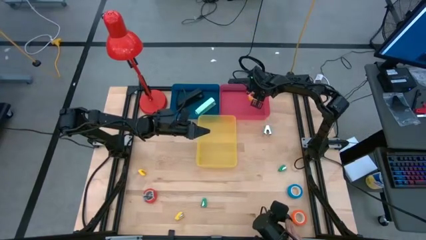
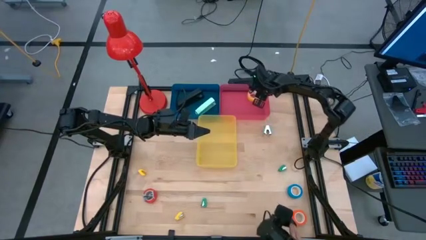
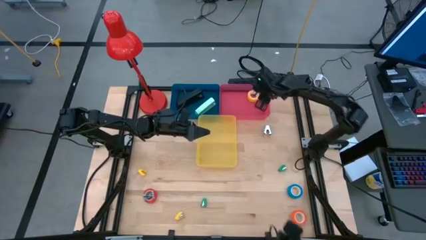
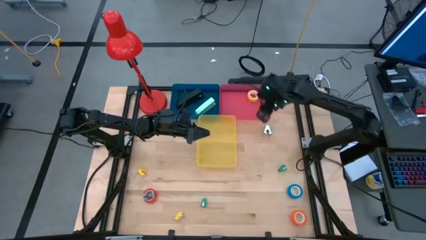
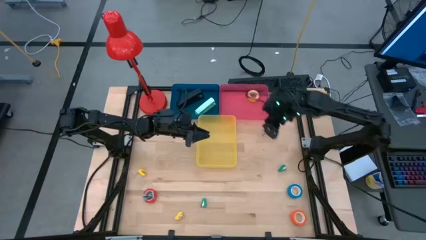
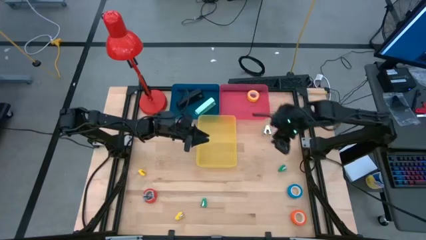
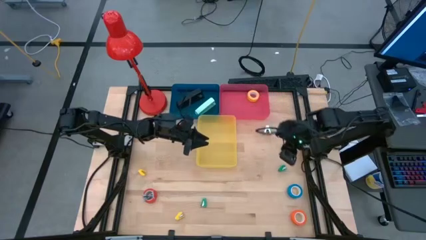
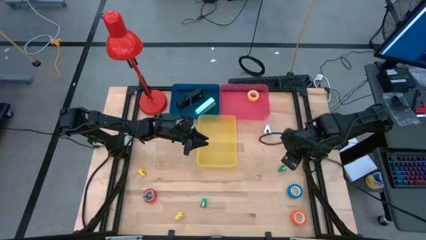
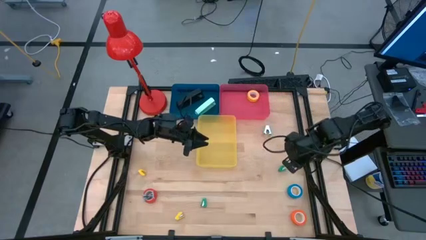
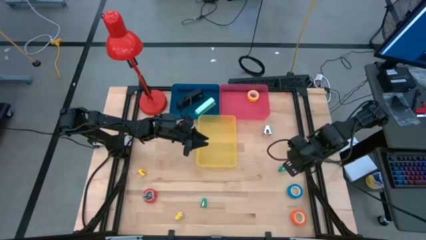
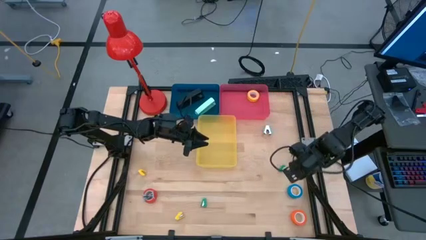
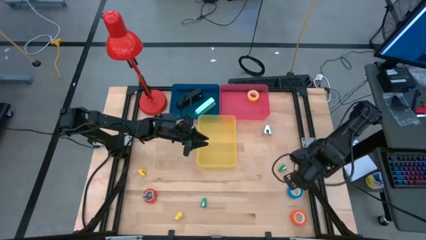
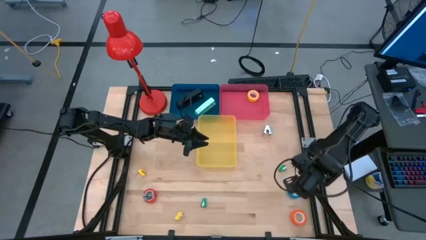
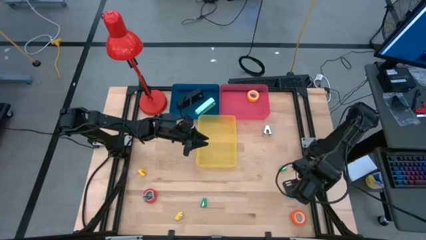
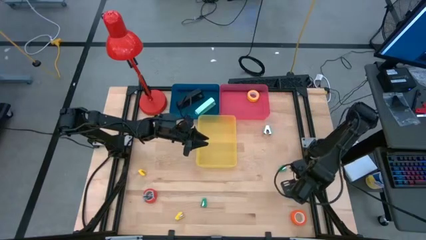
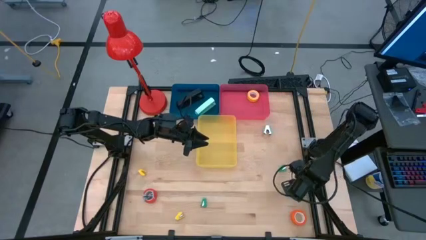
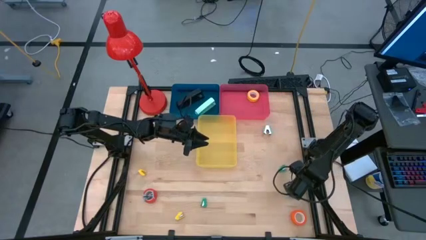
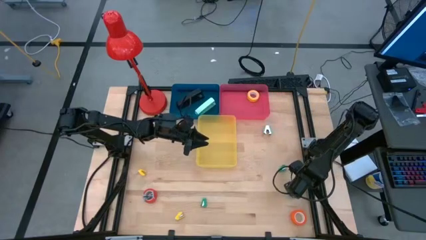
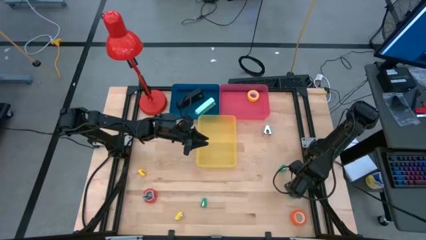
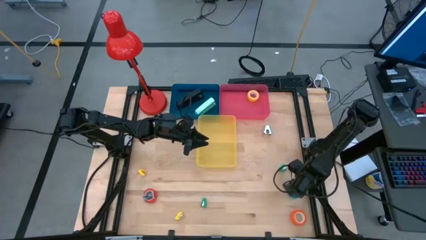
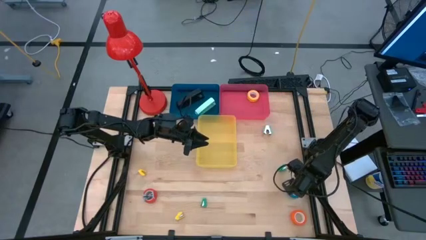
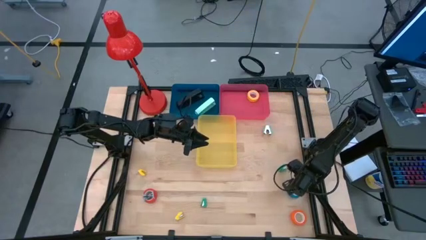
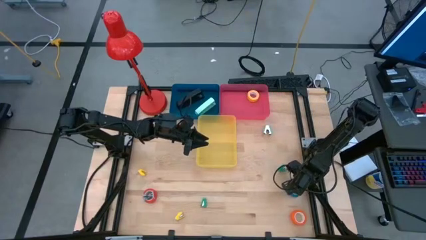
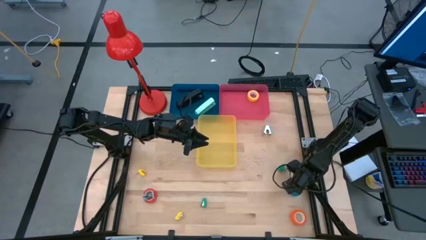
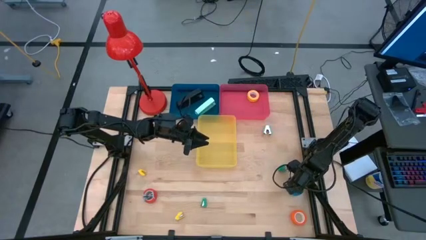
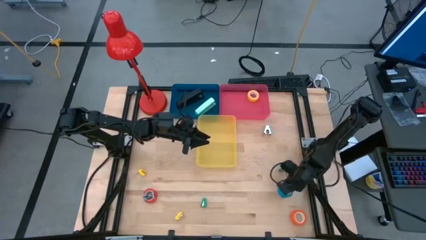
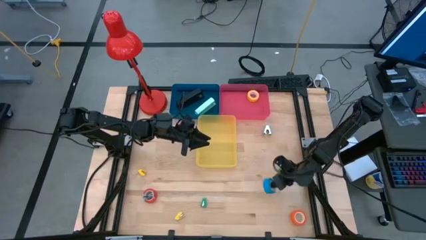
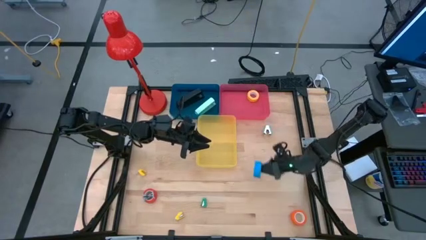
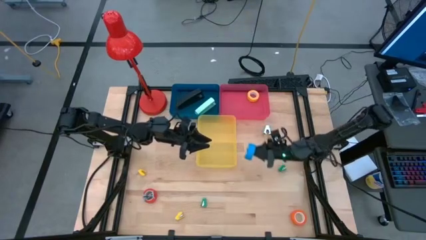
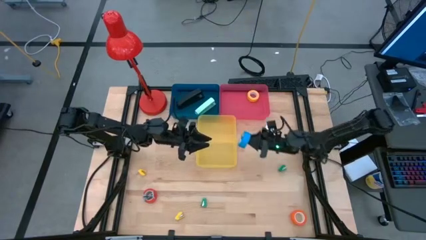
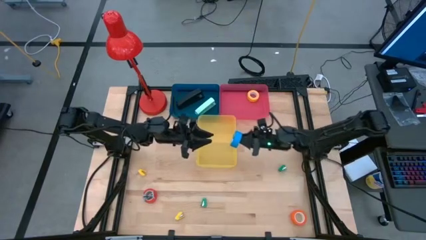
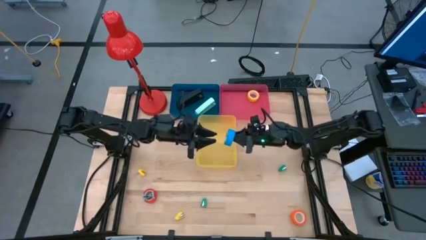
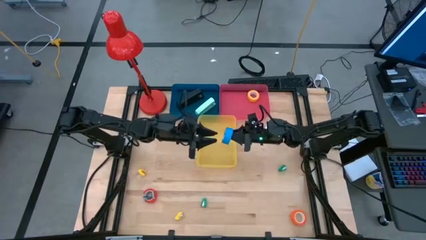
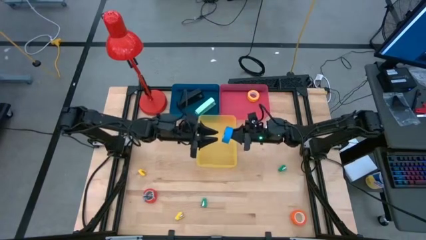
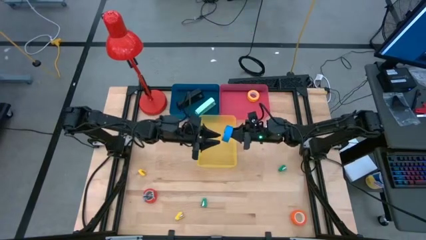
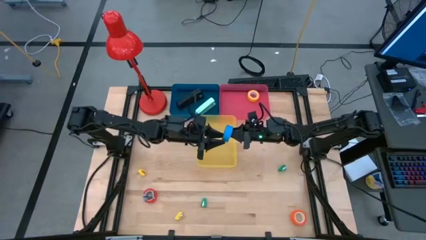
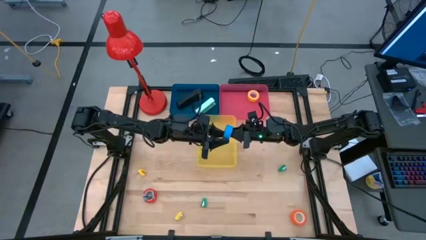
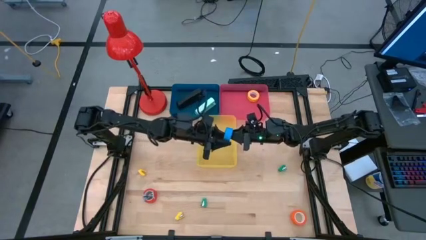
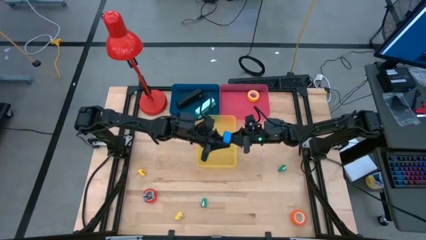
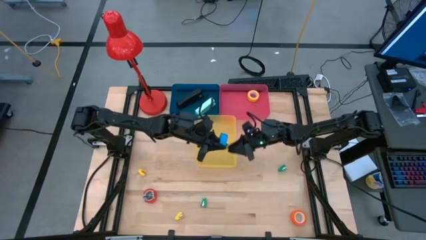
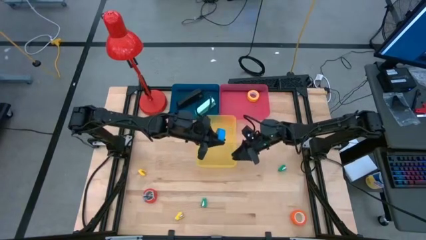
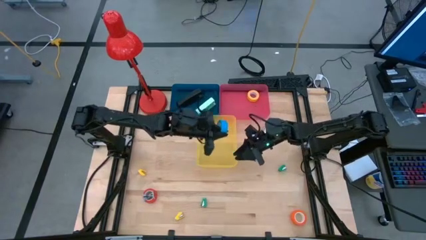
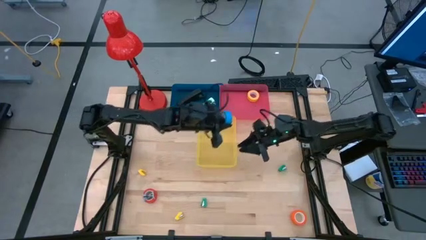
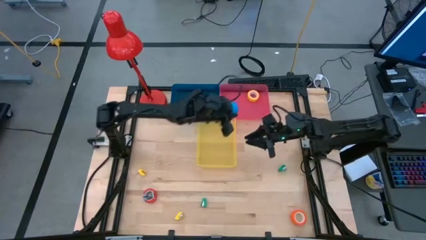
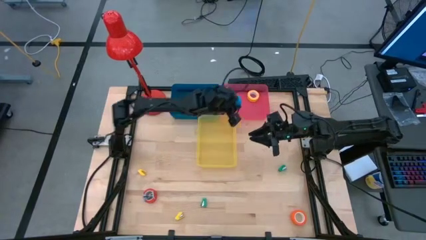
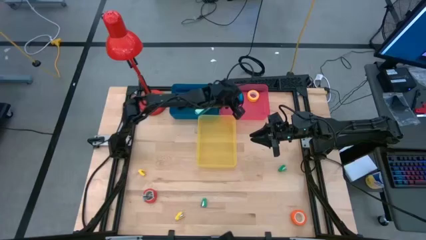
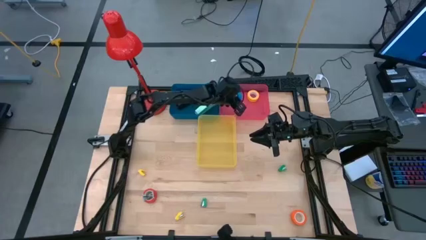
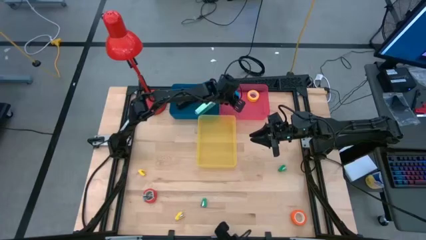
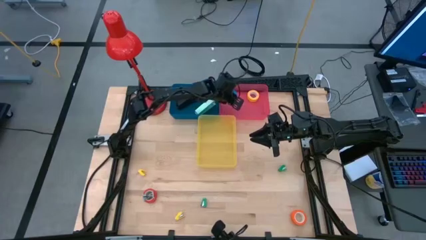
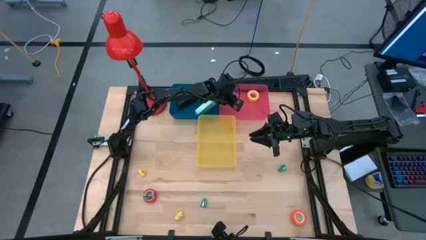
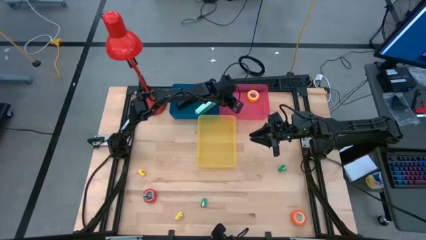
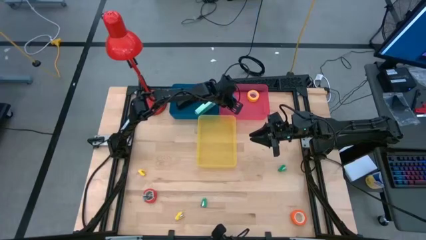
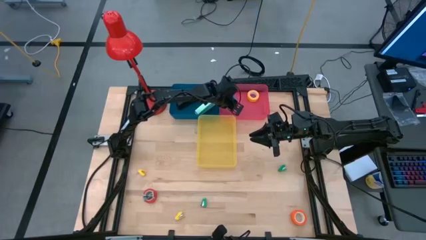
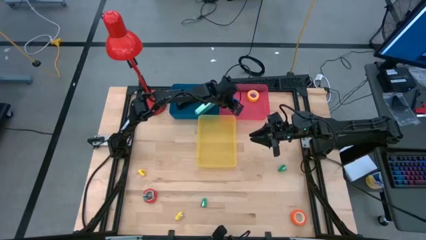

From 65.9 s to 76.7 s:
Task: Pick and place Stapler, Stapler remover, tape
Put the blue tape into the pink bin

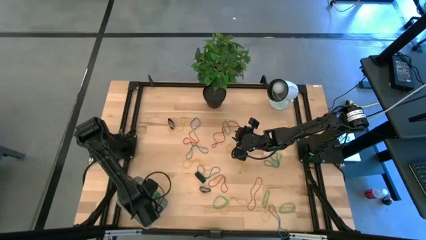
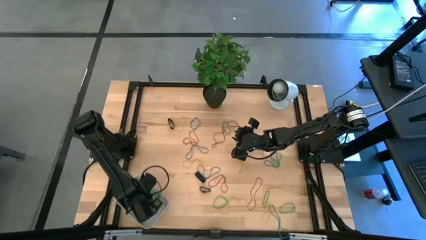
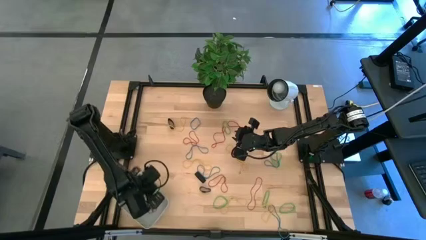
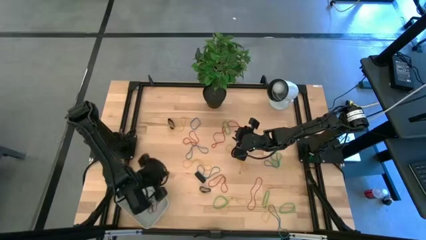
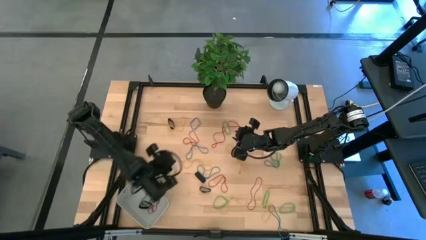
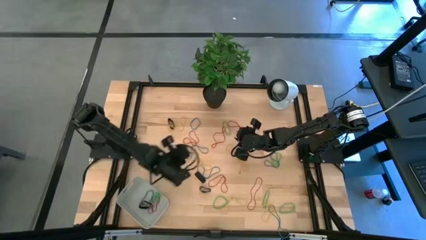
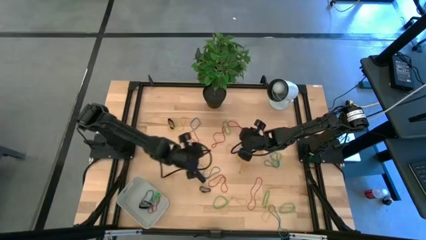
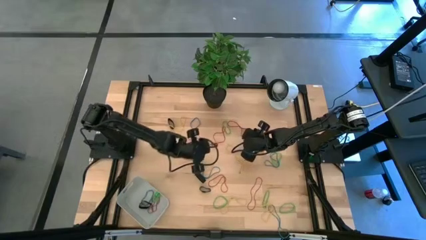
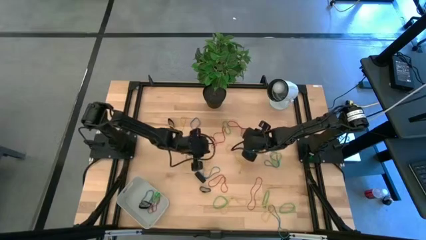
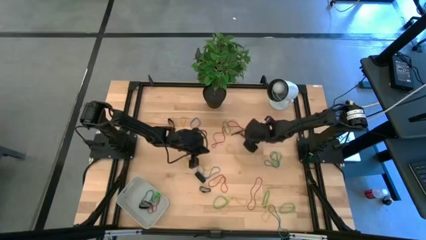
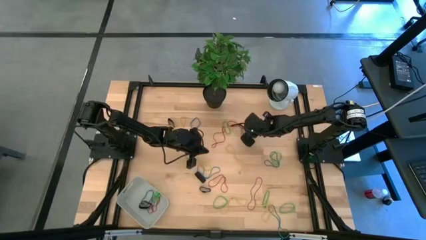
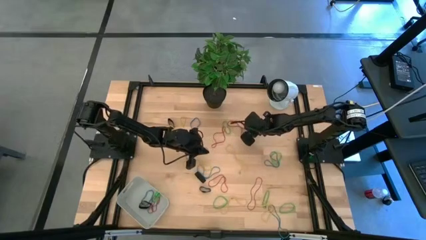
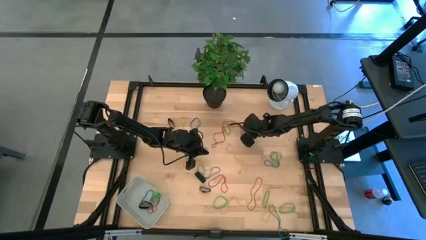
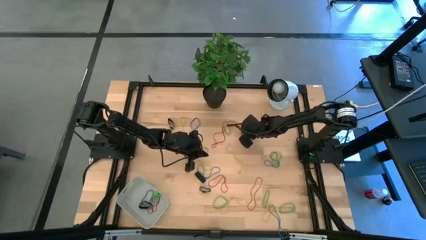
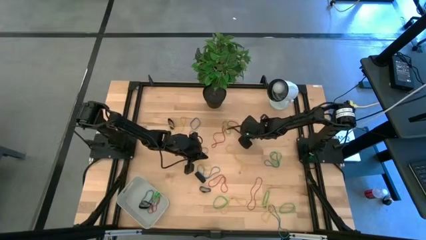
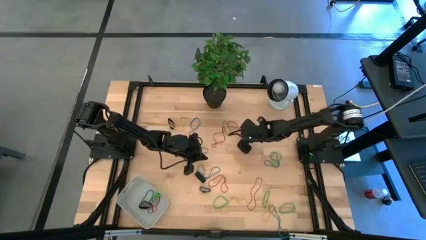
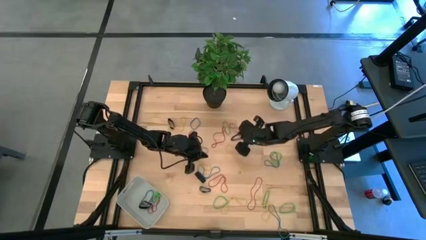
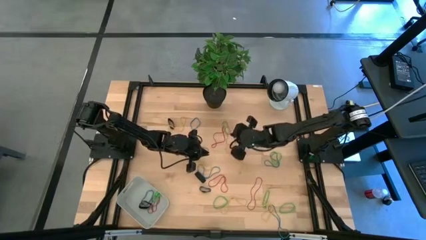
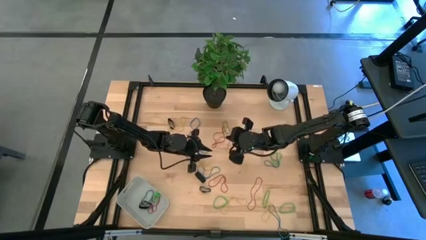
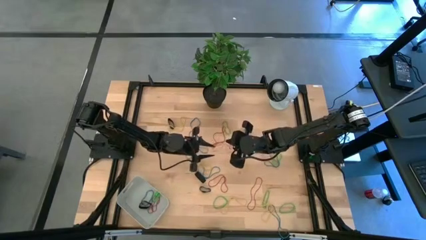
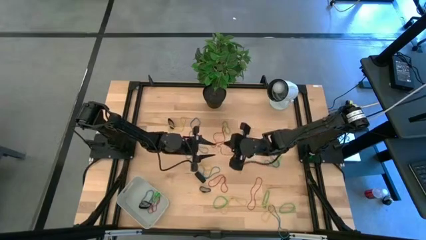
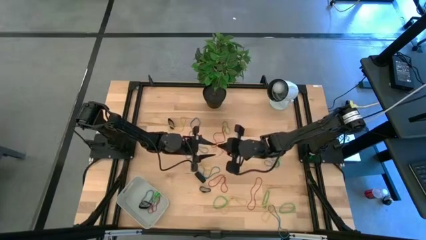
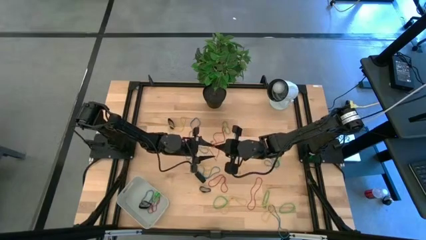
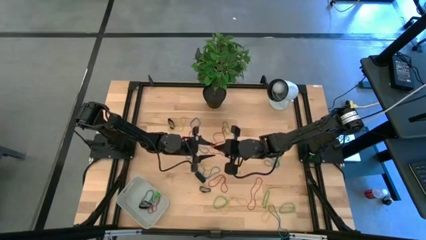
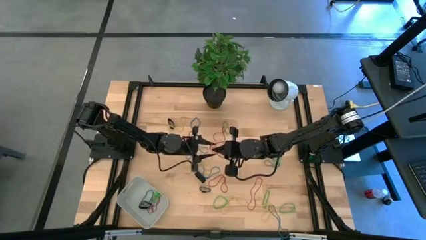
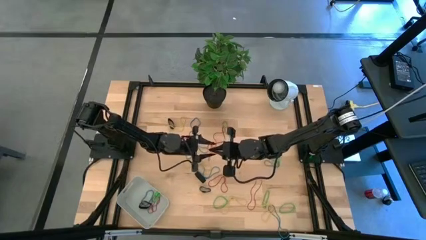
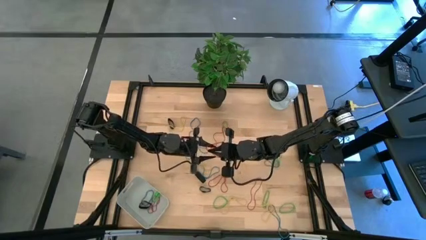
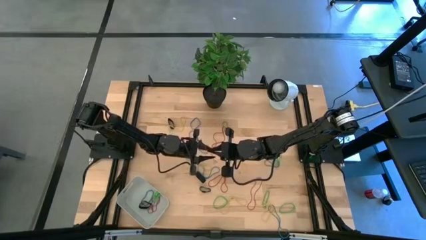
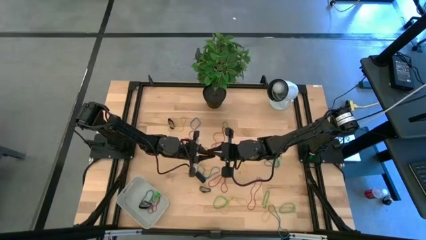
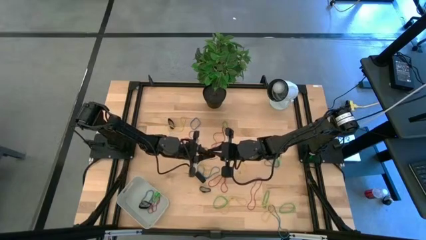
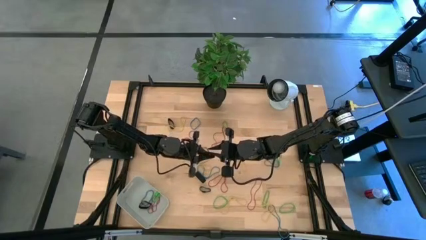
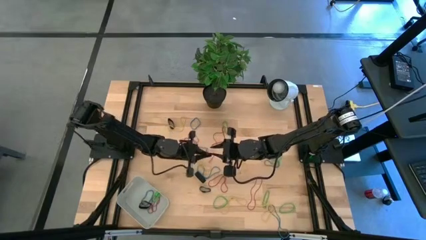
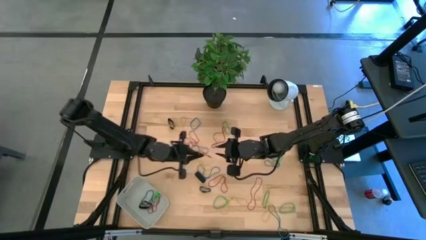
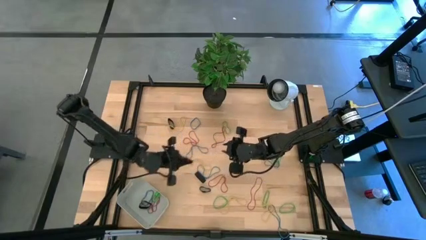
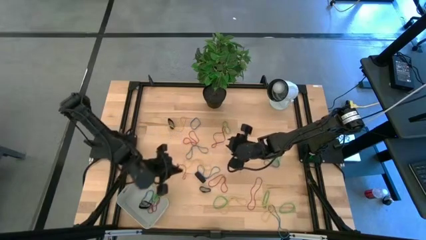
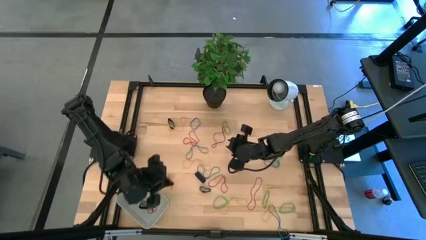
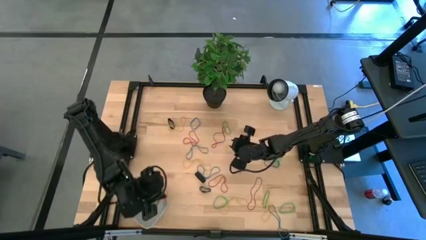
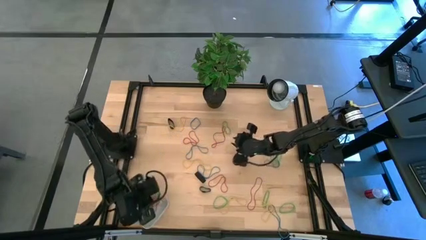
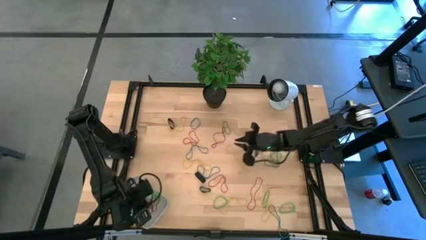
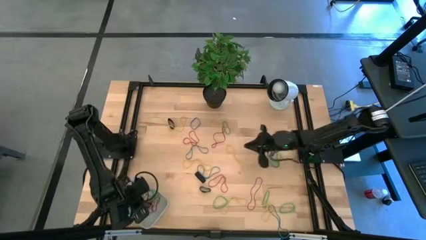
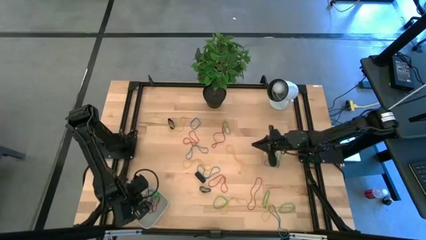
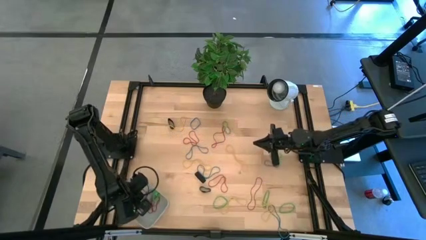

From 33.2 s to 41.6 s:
Task: Pick and place rubber bands into bin
Put the red rubber band into the gray bin
